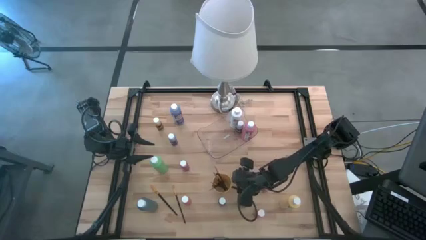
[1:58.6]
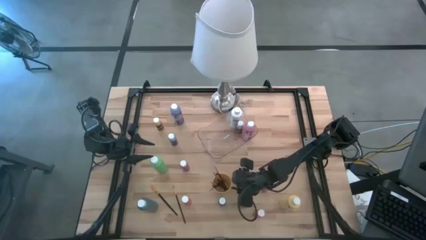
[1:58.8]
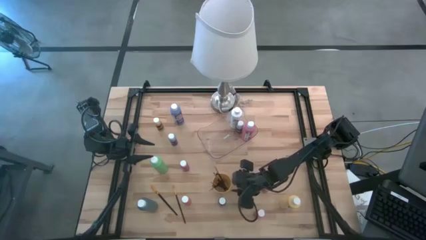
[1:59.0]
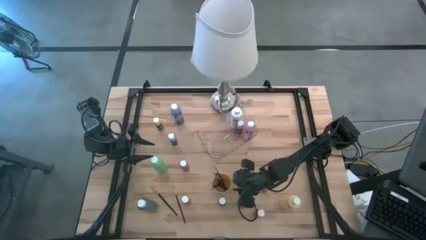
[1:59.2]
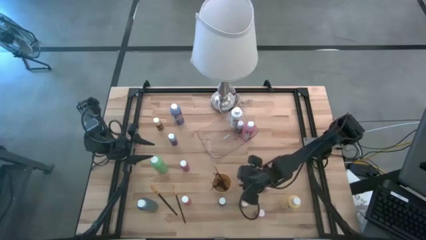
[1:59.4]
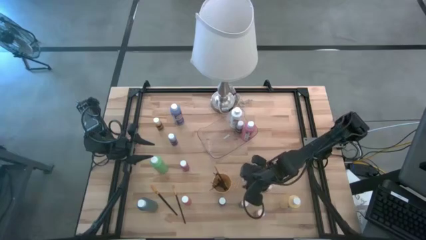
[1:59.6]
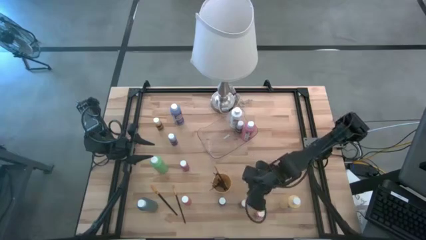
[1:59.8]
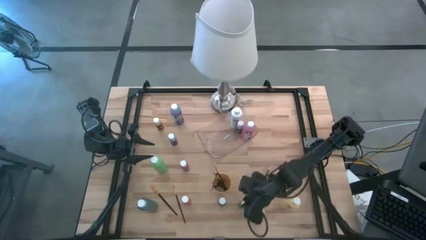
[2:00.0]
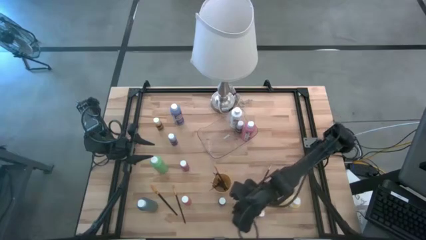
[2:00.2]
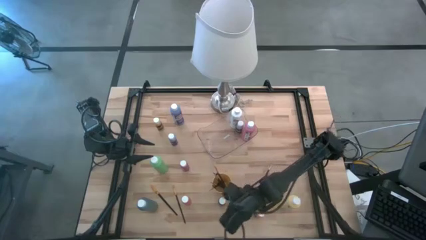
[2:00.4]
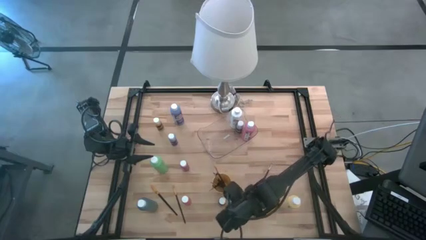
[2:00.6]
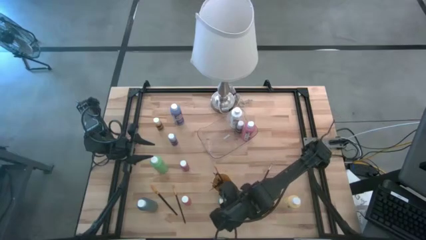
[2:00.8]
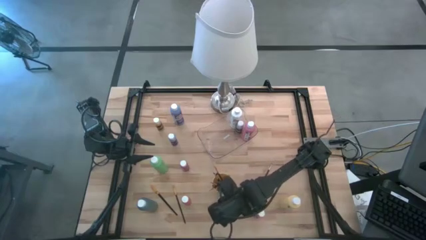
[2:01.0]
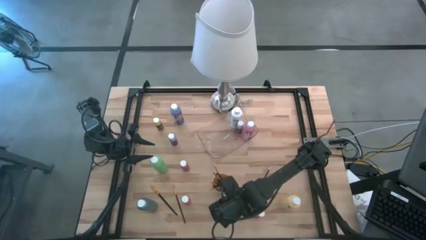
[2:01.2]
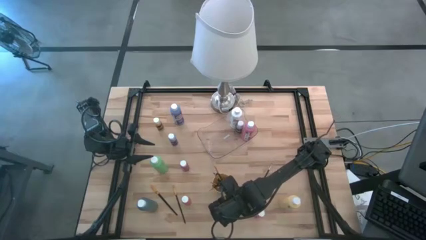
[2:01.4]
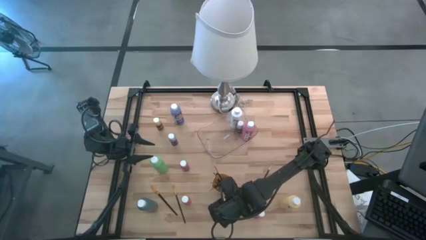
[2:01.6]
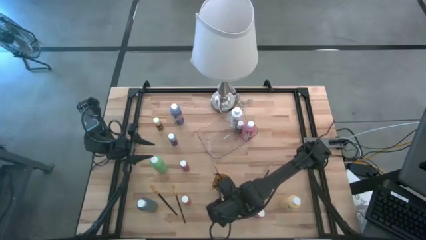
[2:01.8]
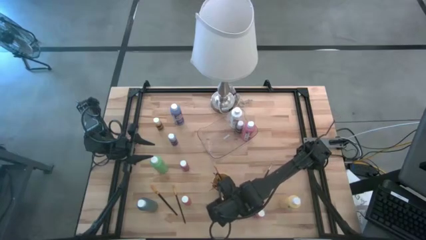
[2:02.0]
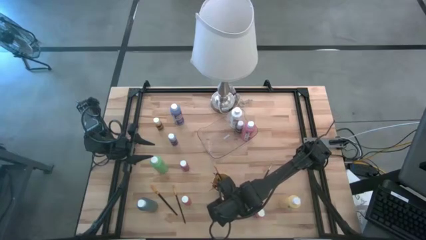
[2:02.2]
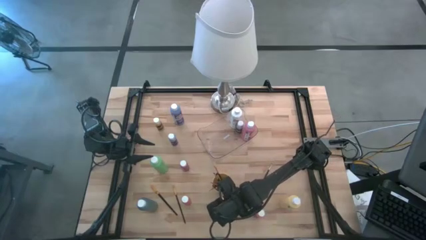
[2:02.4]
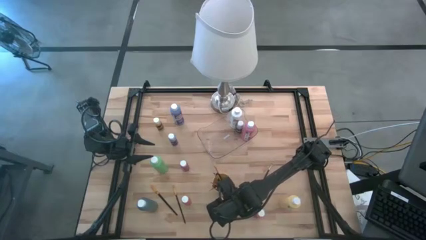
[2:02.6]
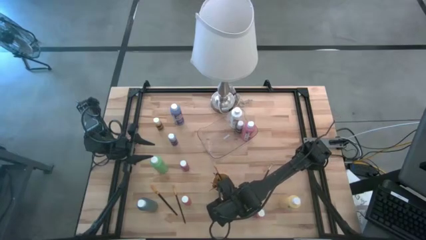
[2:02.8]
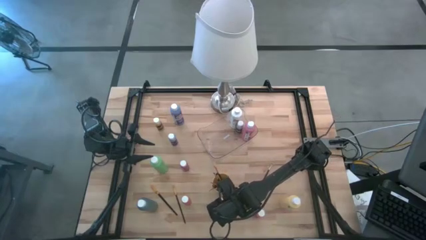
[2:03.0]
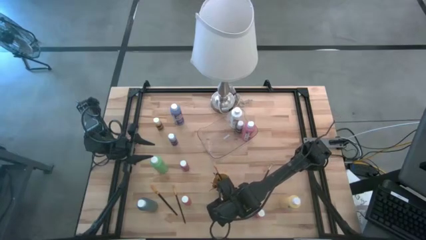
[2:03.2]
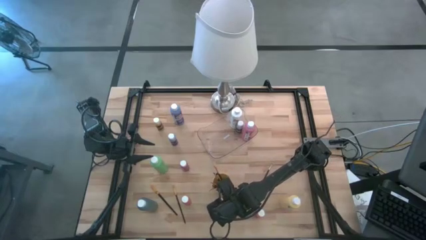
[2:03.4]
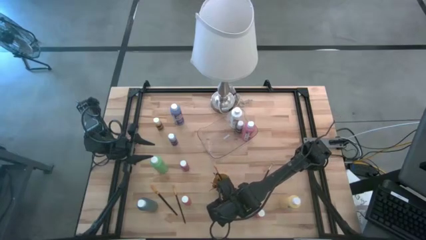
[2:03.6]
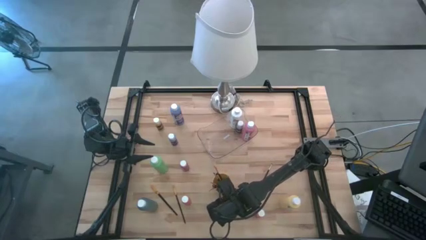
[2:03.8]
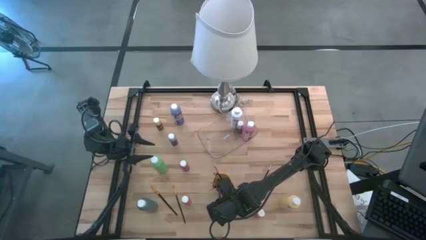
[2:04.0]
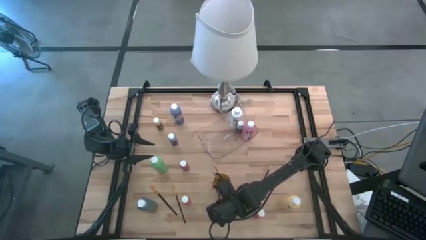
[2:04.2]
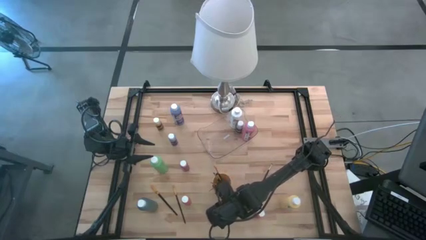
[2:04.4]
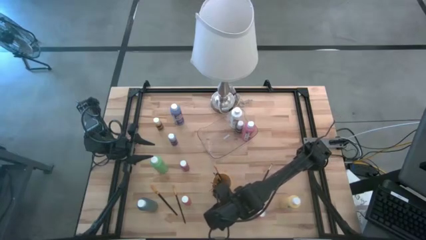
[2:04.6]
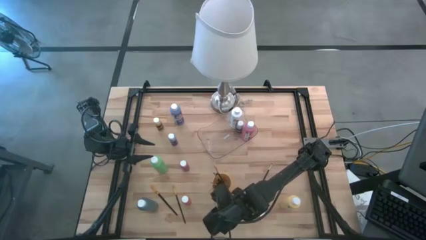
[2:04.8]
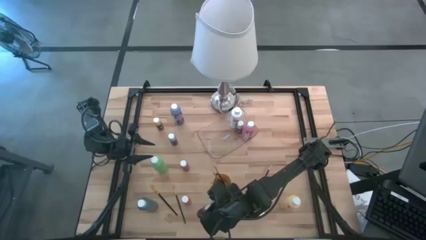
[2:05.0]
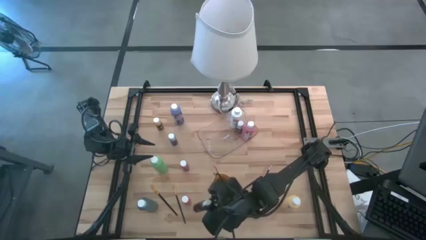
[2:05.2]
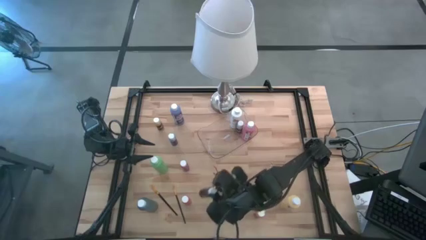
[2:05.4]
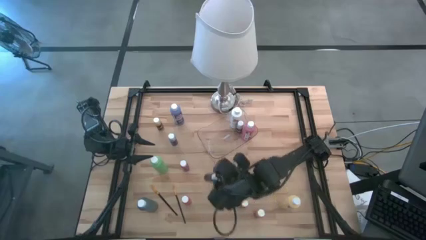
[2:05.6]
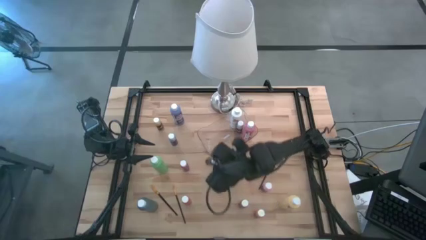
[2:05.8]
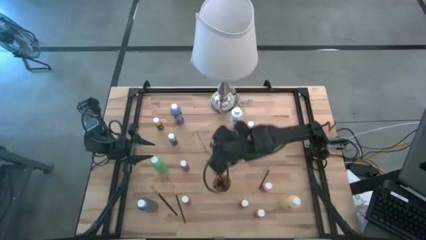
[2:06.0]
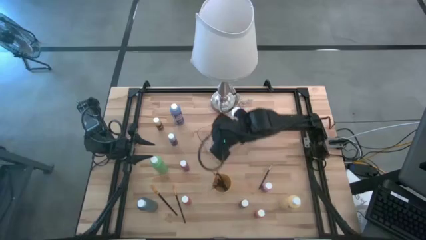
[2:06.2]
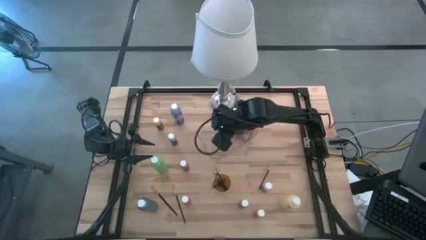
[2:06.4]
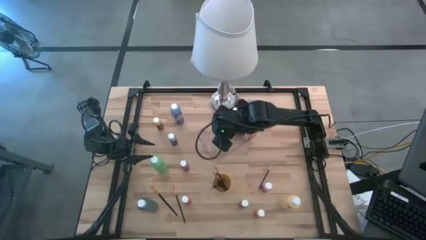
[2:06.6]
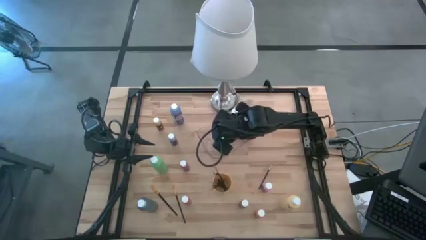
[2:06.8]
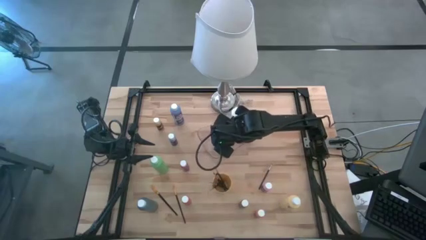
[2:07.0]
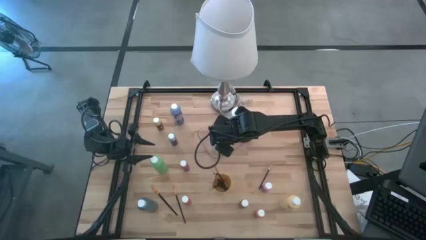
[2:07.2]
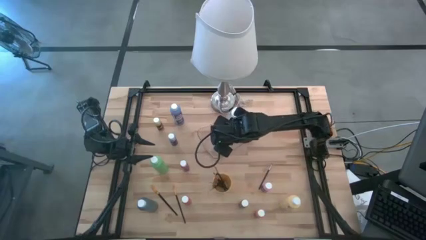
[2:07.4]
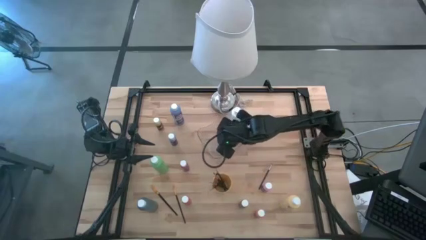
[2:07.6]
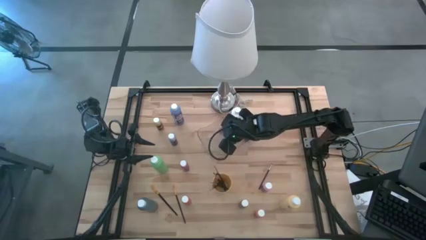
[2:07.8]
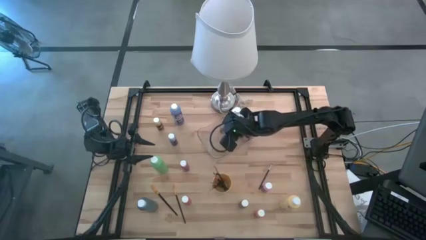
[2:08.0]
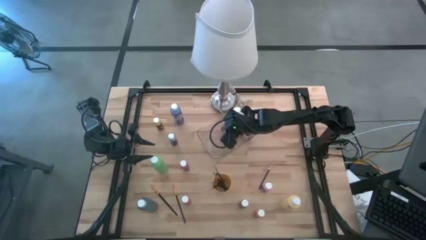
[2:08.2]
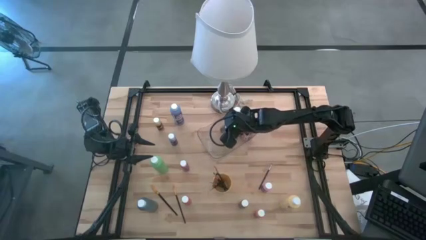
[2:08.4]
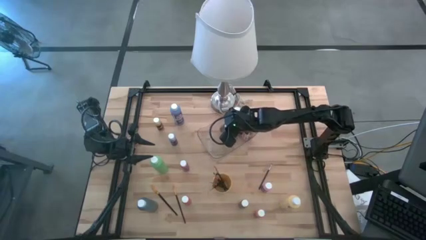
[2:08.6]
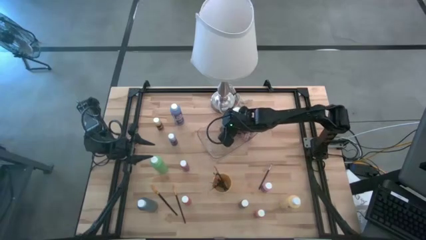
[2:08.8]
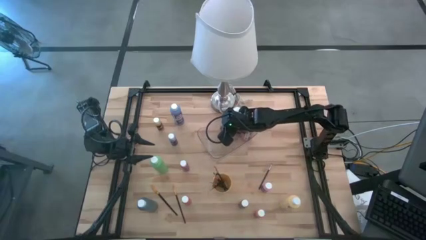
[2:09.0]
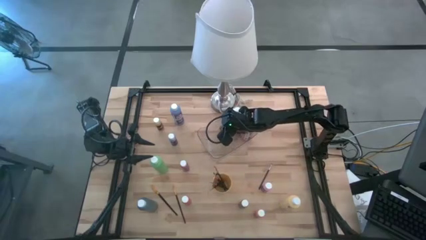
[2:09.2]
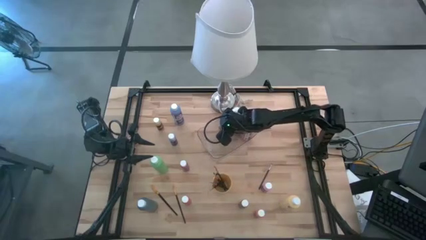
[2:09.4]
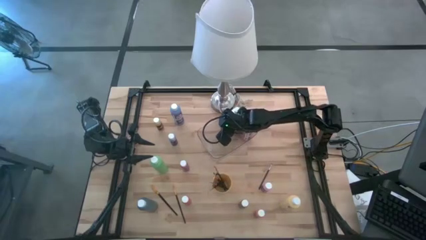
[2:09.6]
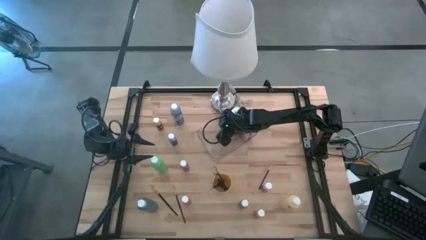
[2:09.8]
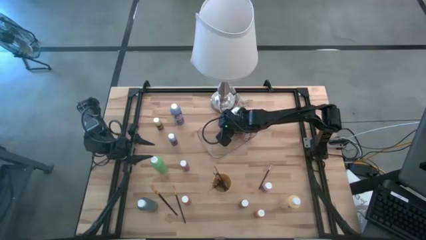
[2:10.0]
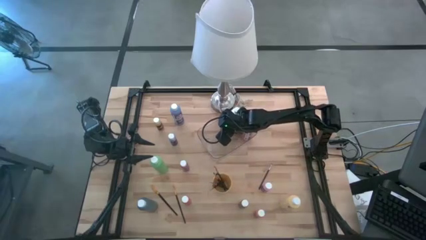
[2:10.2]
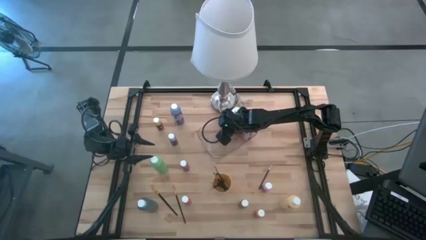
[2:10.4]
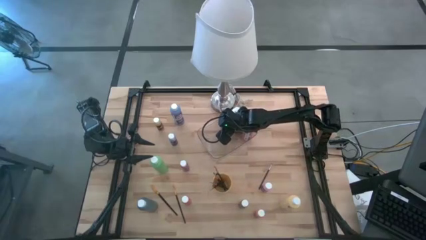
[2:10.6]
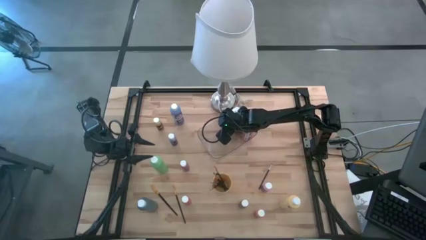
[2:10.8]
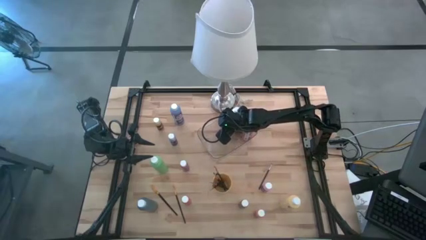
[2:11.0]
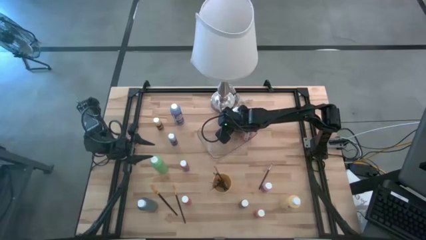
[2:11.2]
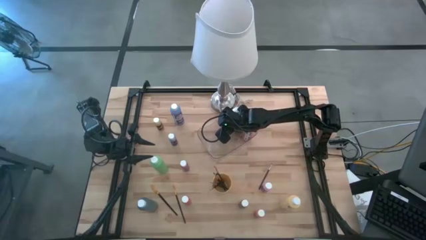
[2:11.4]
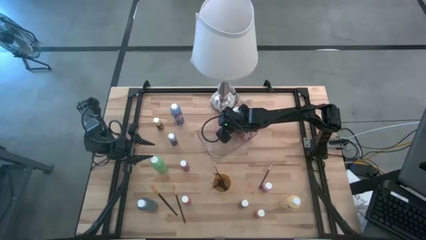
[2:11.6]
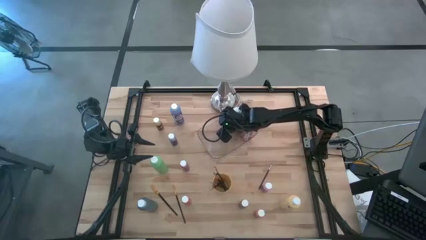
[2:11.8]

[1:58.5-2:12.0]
Task: Pick & Place Paint Supplies
Put the black bottle into the transparent bin
